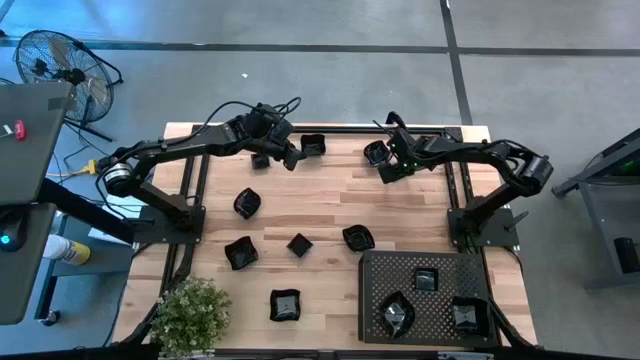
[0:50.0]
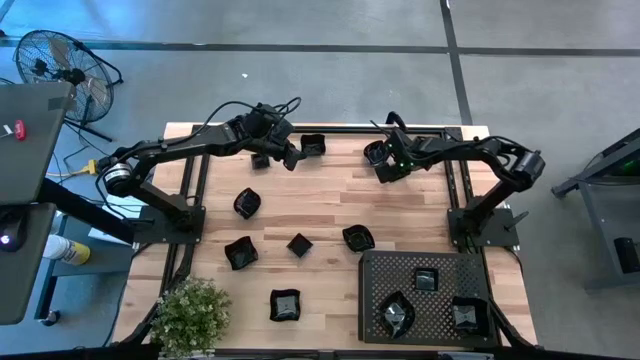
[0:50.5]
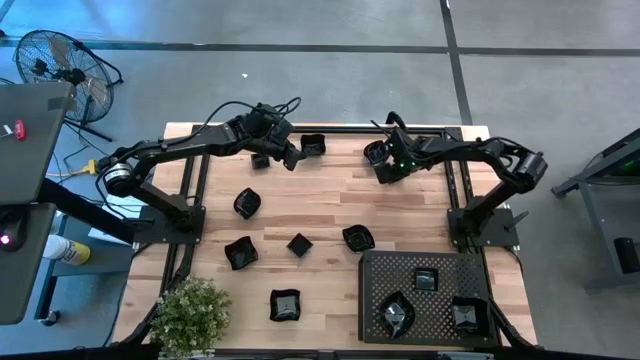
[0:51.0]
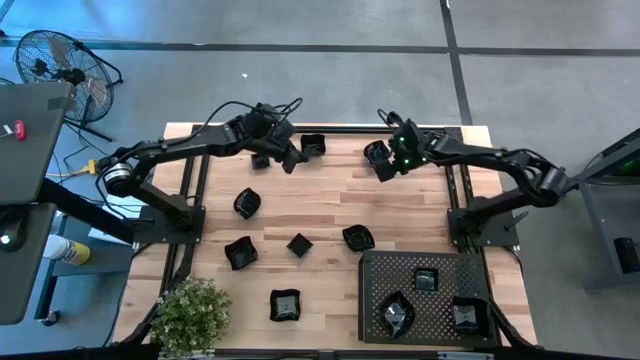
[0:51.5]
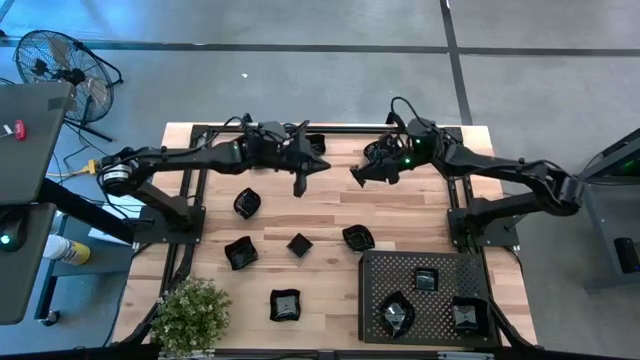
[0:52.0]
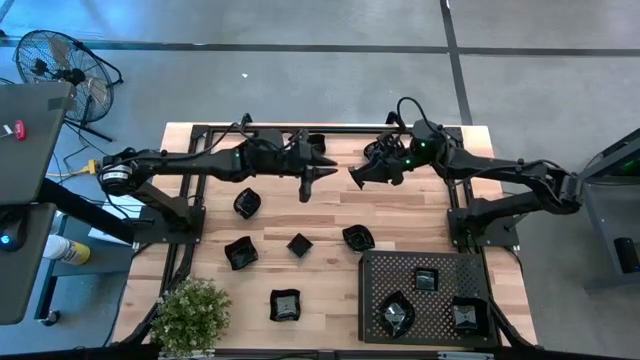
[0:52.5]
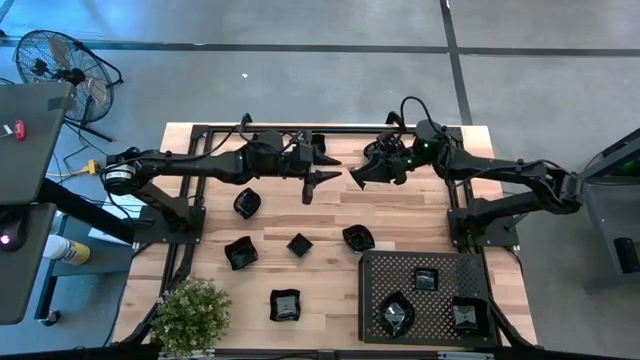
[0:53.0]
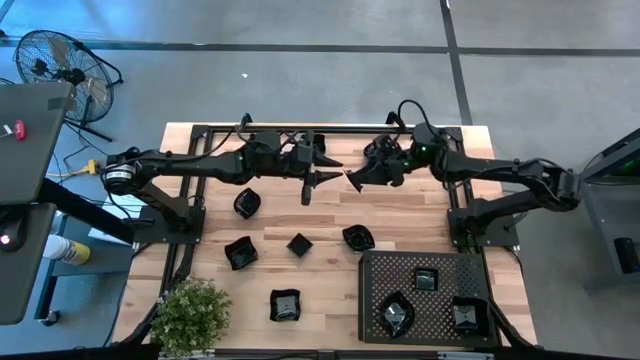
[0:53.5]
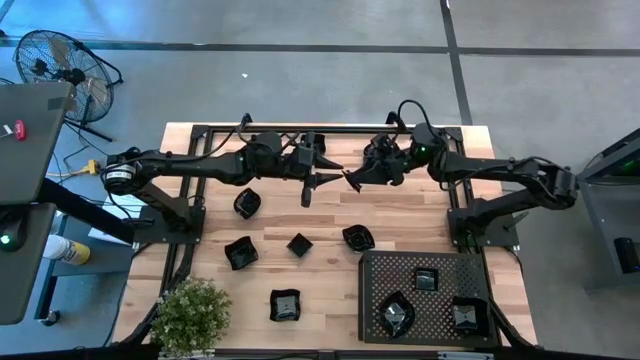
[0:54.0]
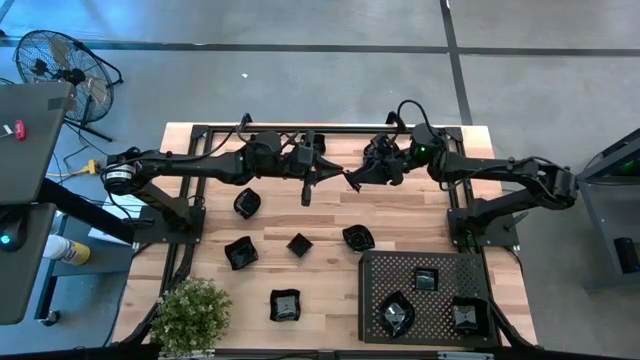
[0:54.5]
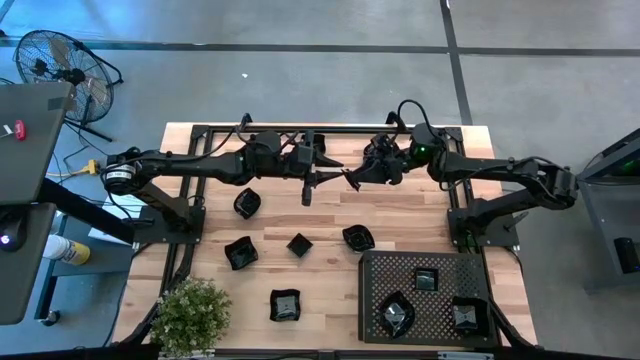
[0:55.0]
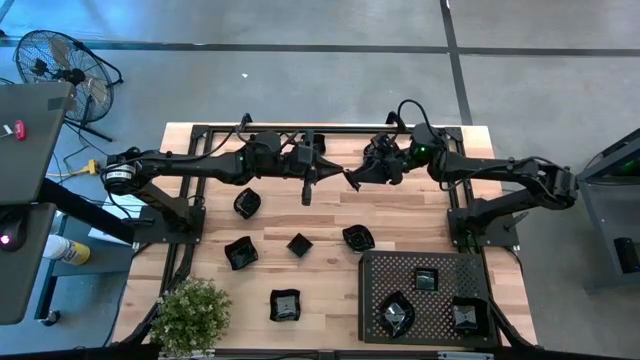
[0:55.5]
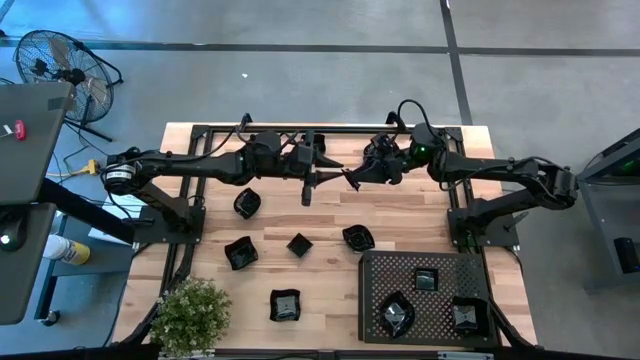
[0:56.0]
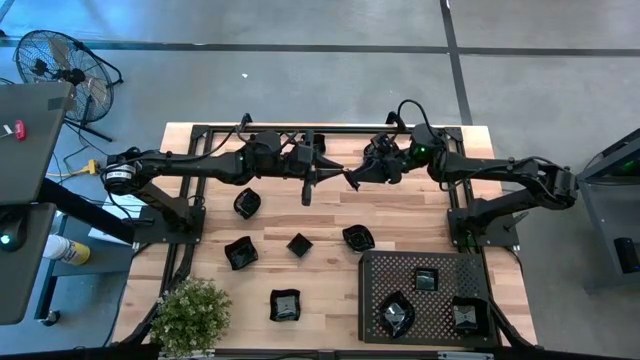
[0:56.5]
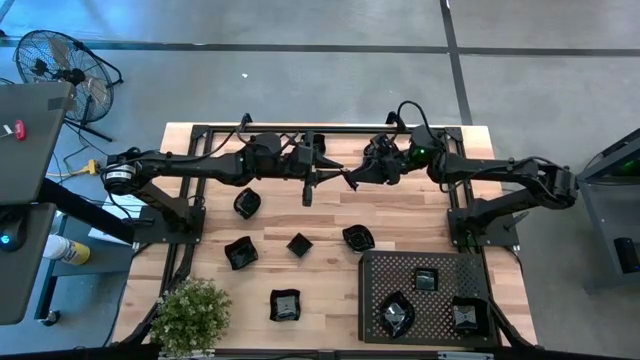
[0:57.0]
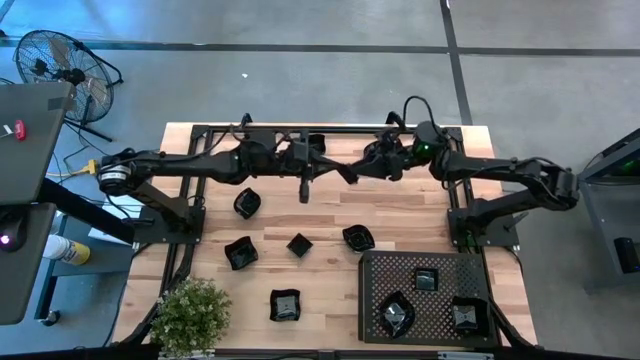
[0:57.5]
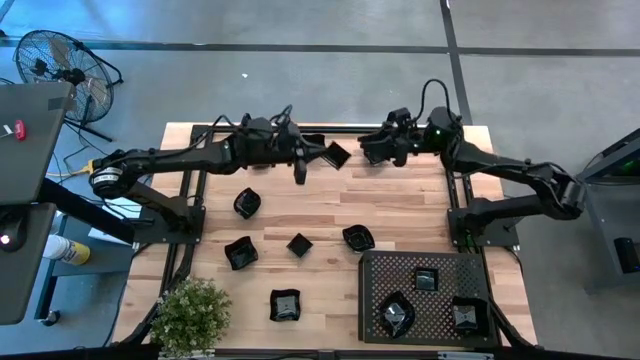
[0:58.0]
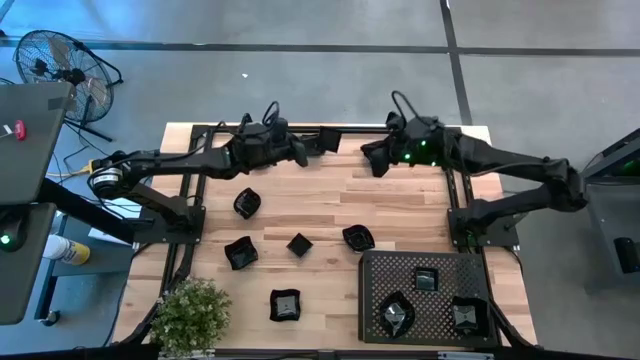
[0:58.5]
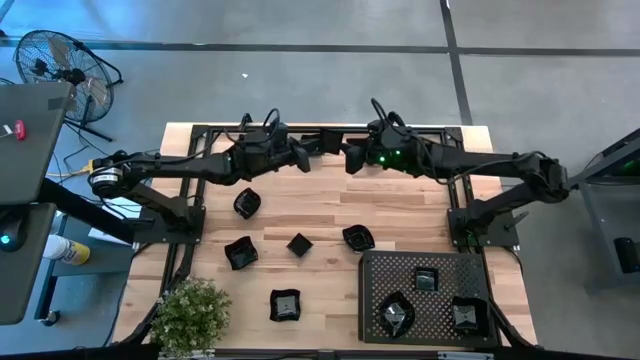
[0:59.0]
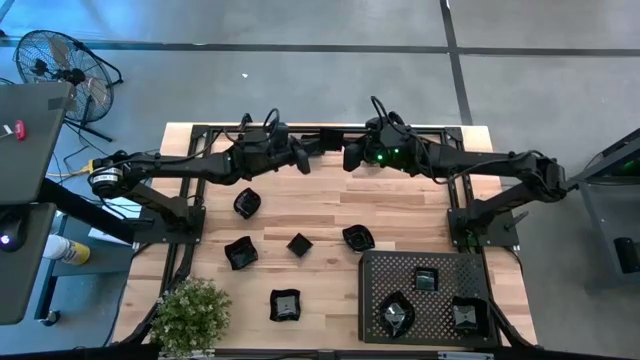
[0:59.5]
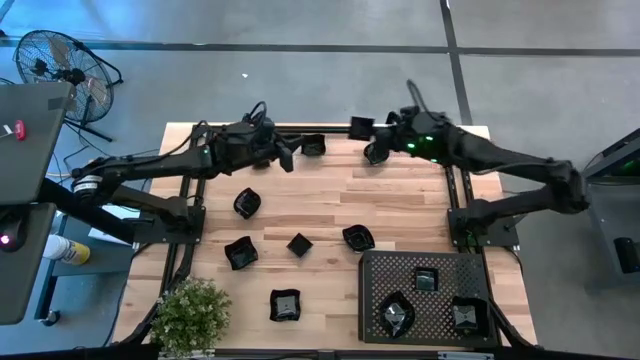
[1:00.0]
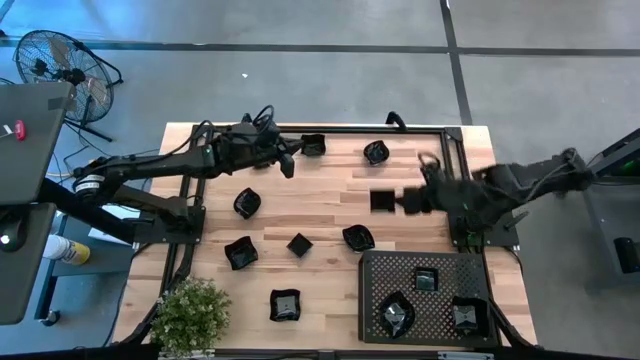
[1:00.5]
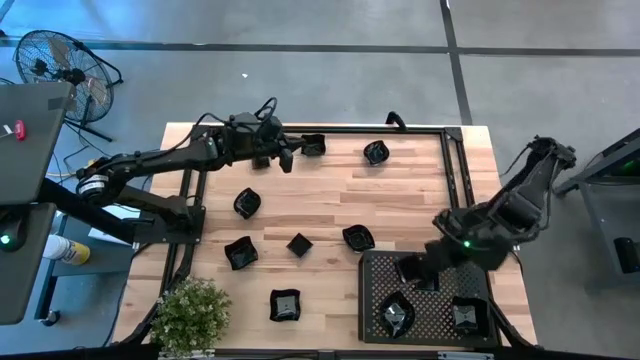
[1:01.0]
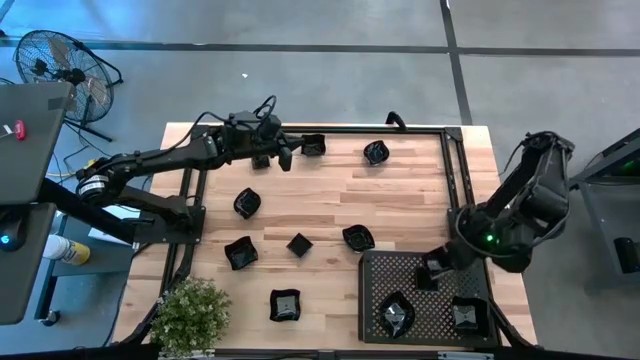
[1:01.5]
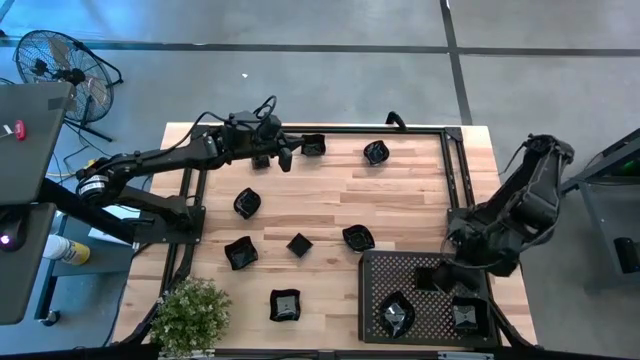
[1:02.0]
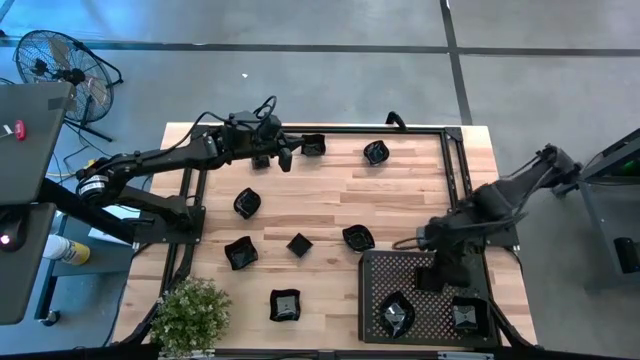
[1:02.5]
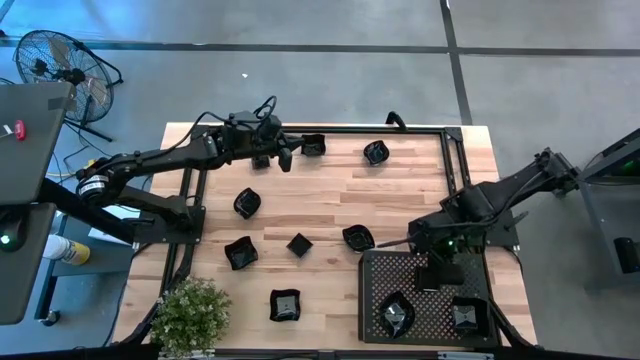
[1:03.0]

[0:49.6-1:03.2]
Task: Pick & Place Mini shaped plates
Stack the black square plate on top of the black square plate on the shelf

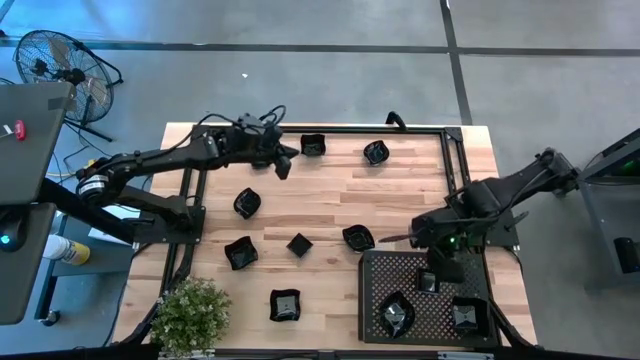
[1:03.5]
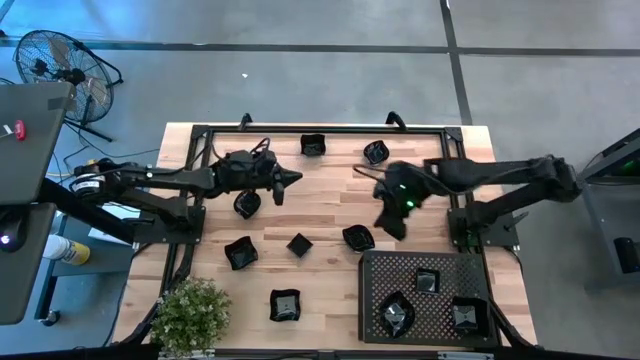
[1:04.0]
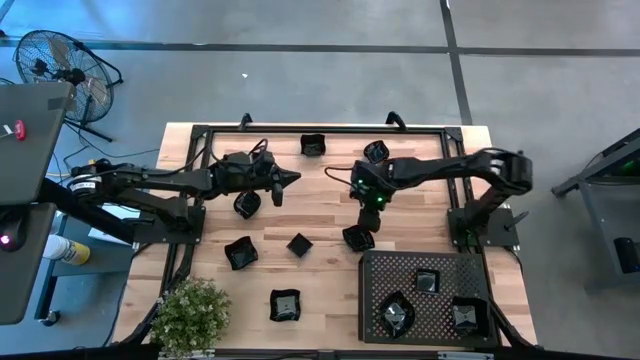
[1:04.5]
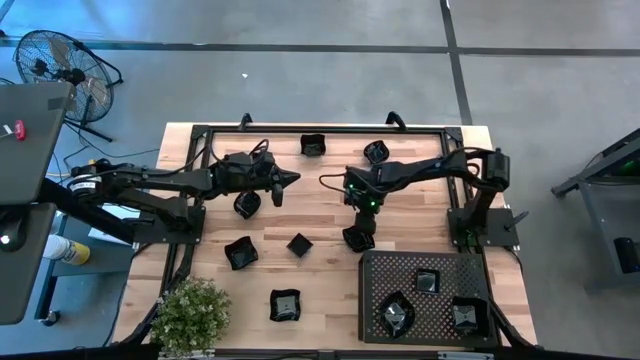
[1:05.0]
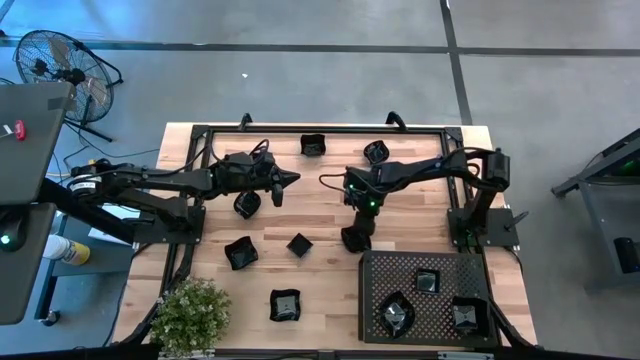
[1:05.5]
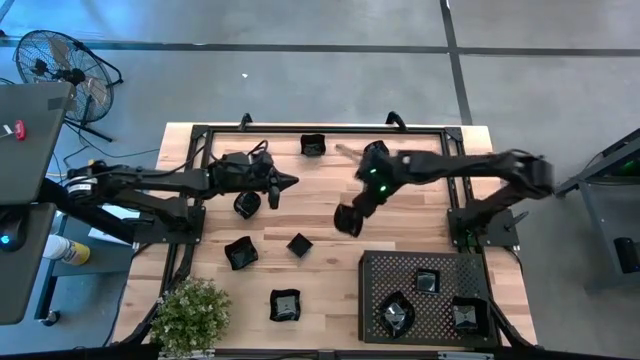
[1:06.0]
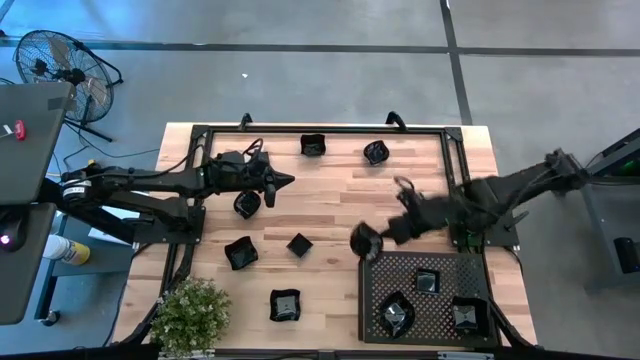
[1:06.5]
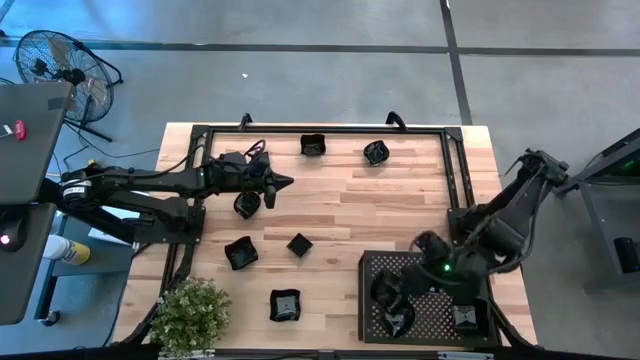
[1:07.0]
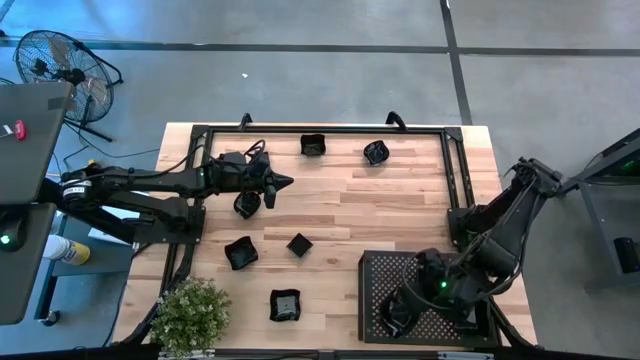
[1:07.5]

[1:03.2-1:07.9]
Stack the black leaf-shaped plate on top of the black leaf-shaped plate on the shelf

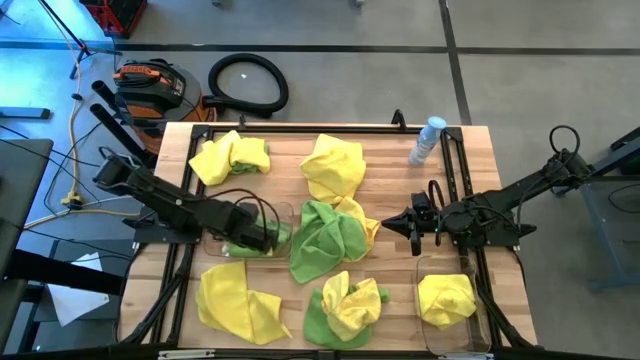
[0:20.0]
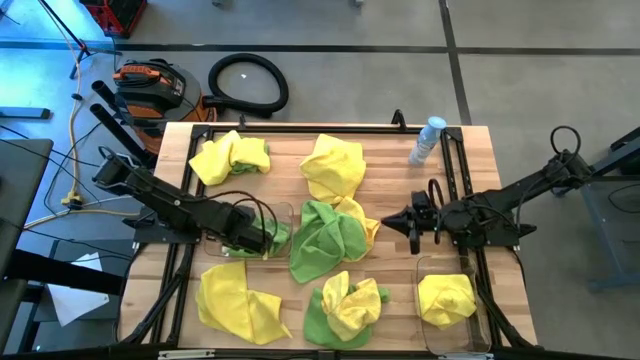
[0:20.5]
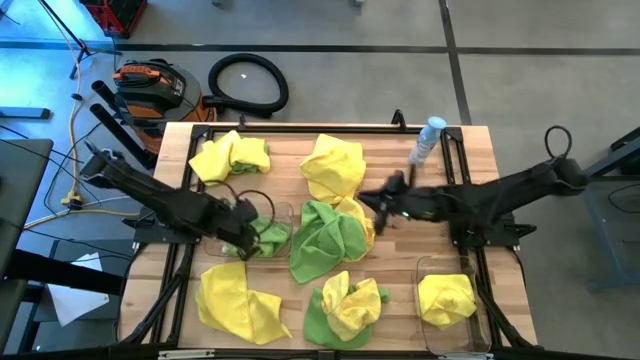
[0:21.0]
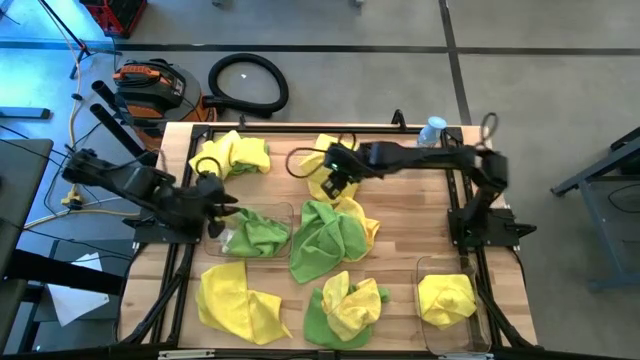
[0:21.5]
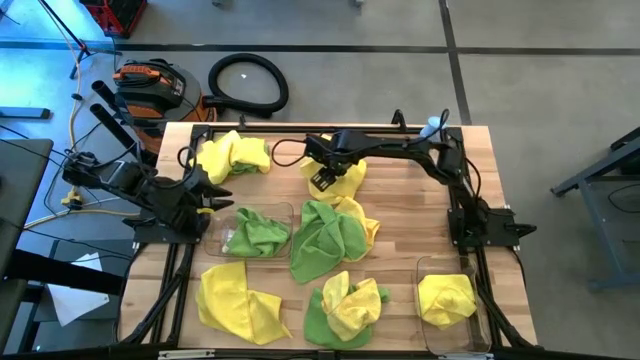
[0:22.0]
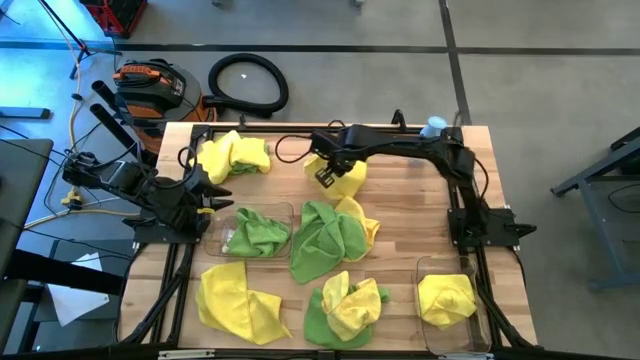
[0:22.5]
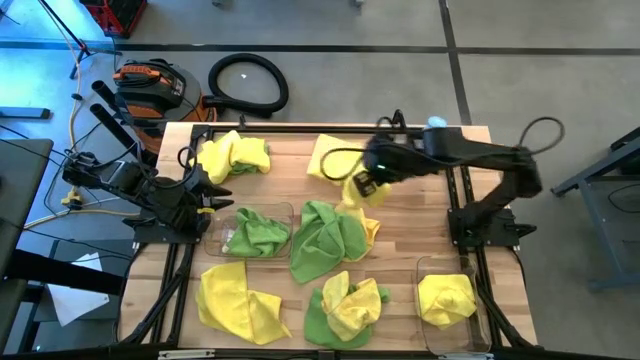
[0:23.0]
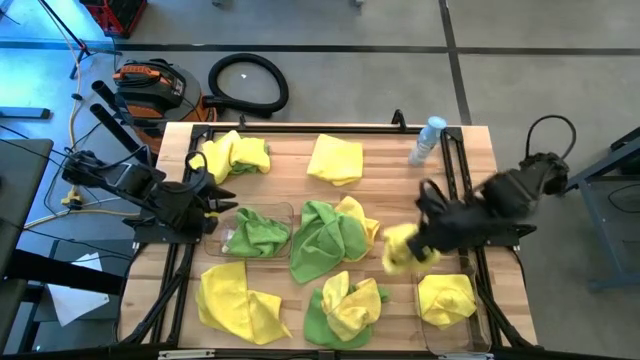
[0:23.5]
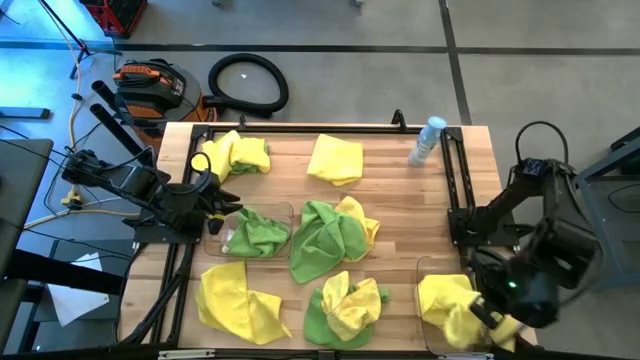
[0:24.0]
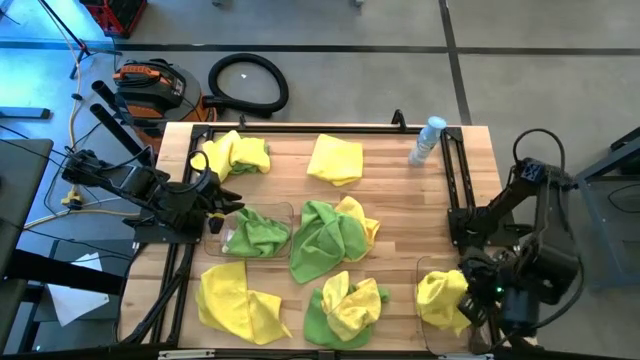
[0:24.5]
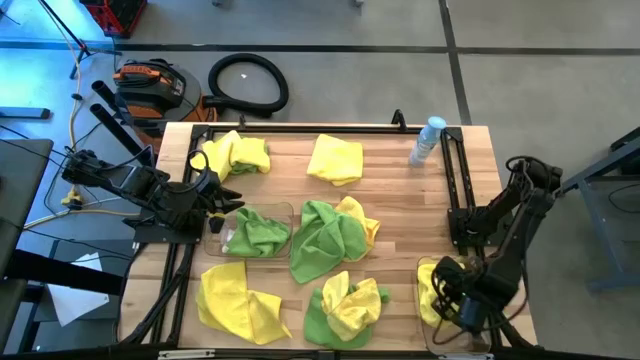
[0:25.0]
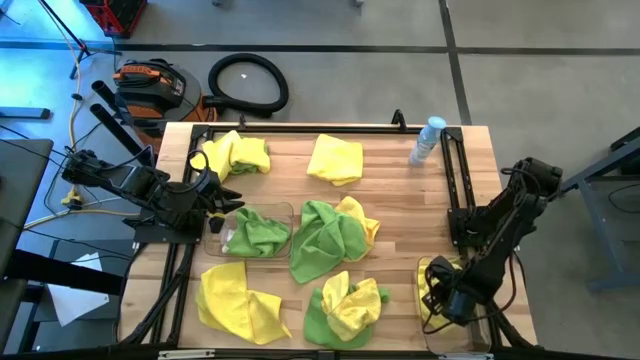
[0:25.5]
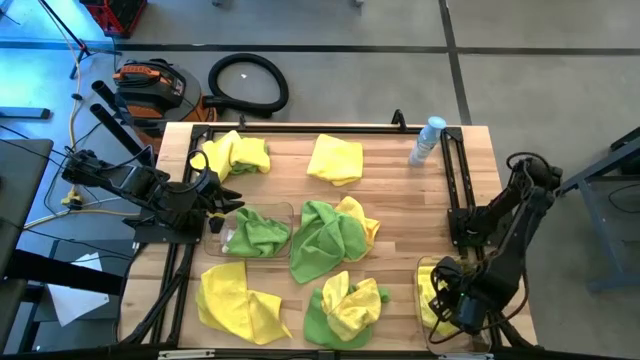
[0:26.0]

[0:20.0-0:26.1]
Task: Sort microfiber towel by color & place in baskets
Put the yellow towel into the right transparent bin
